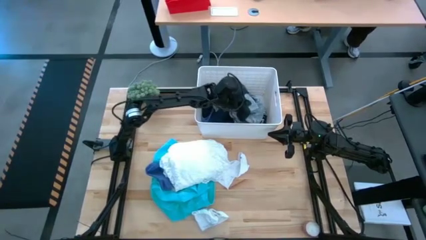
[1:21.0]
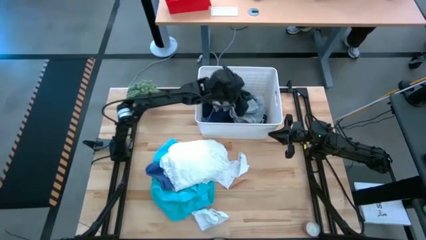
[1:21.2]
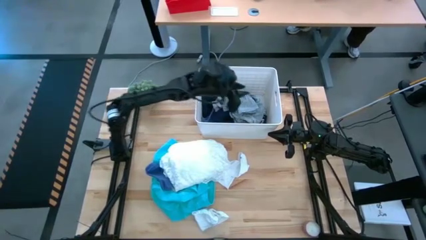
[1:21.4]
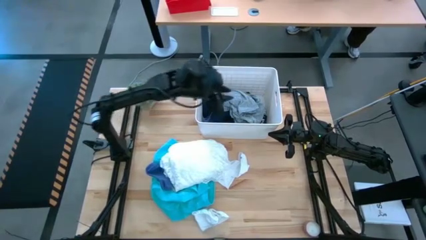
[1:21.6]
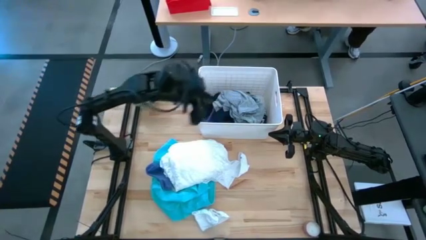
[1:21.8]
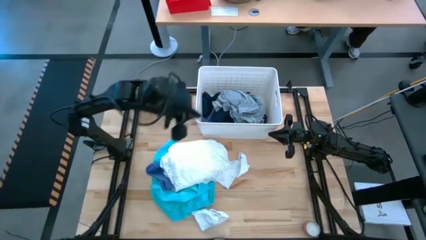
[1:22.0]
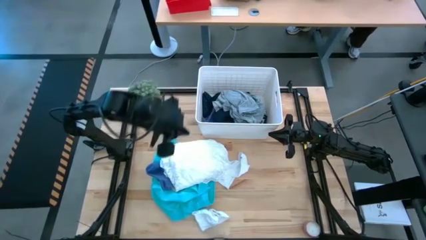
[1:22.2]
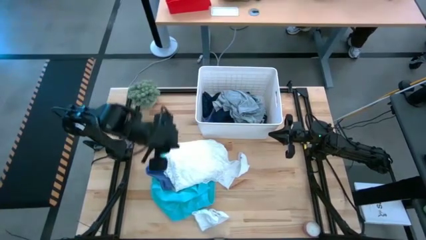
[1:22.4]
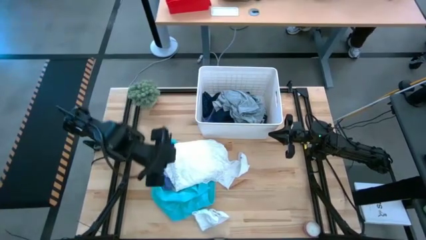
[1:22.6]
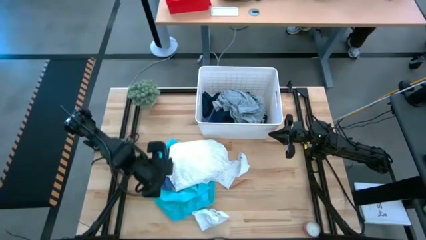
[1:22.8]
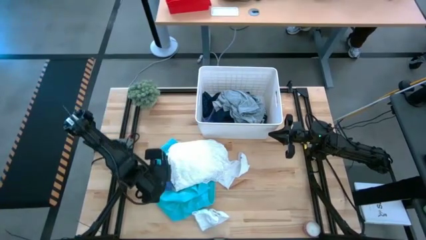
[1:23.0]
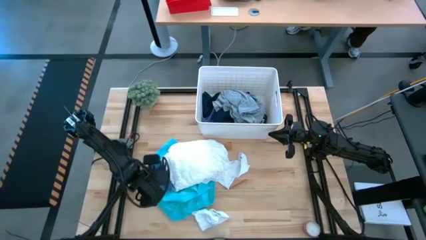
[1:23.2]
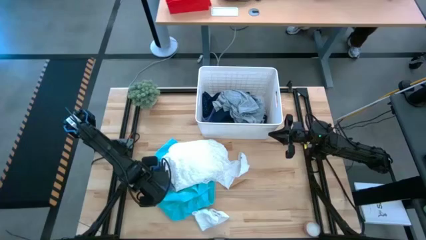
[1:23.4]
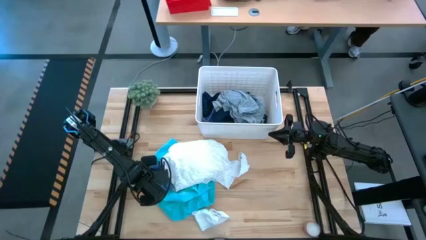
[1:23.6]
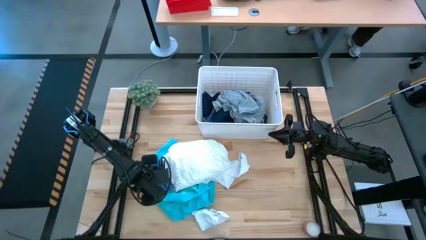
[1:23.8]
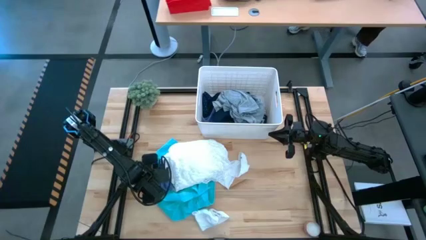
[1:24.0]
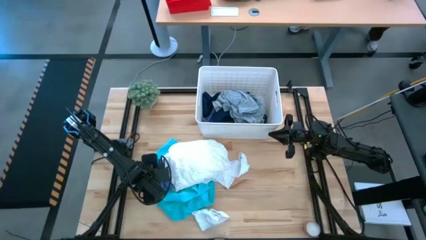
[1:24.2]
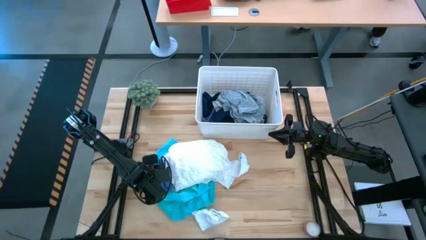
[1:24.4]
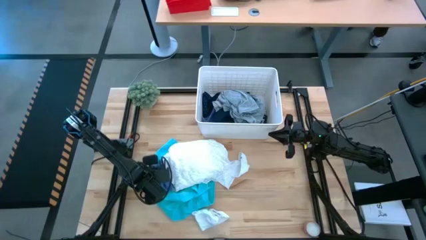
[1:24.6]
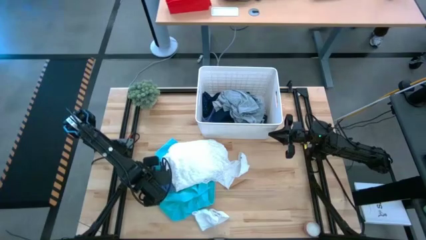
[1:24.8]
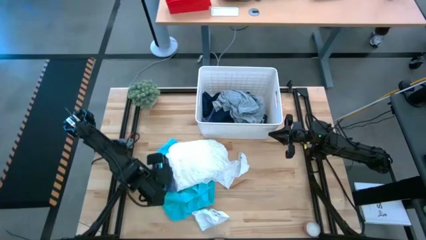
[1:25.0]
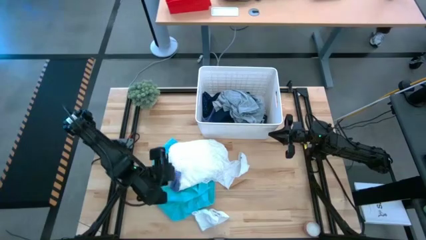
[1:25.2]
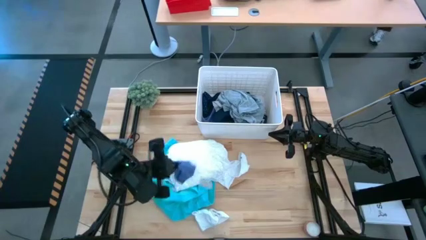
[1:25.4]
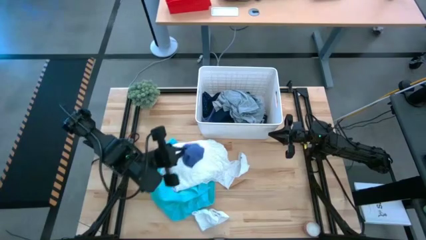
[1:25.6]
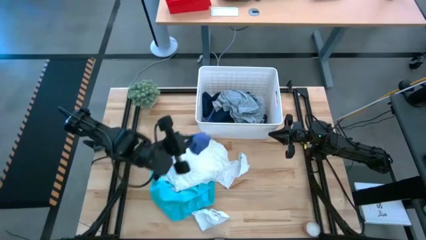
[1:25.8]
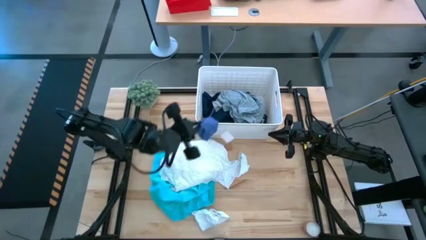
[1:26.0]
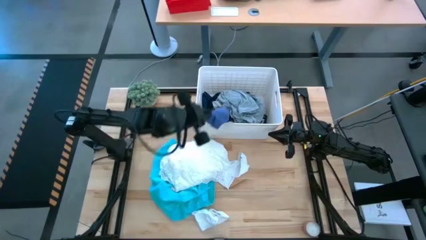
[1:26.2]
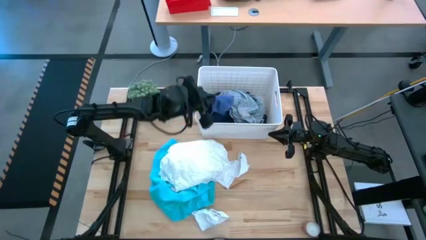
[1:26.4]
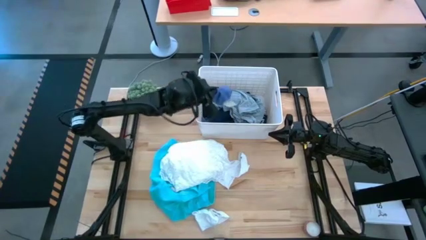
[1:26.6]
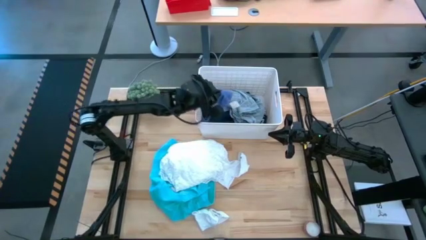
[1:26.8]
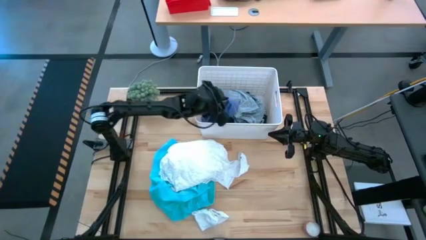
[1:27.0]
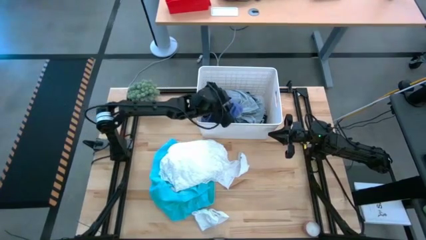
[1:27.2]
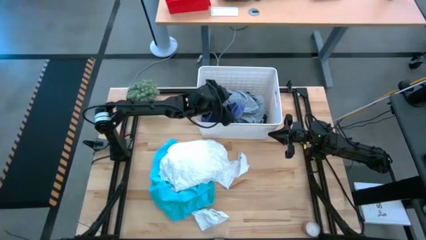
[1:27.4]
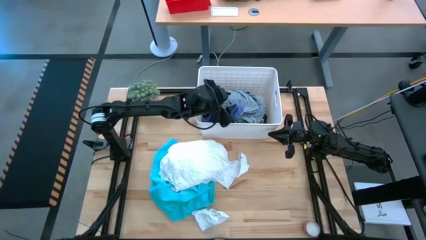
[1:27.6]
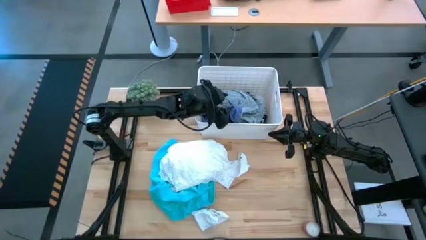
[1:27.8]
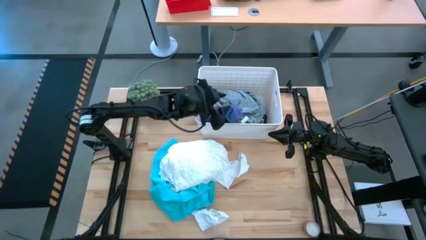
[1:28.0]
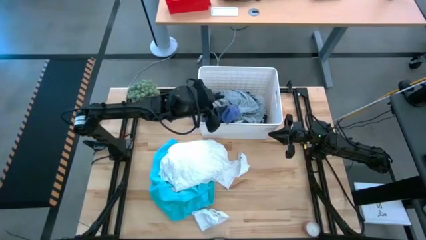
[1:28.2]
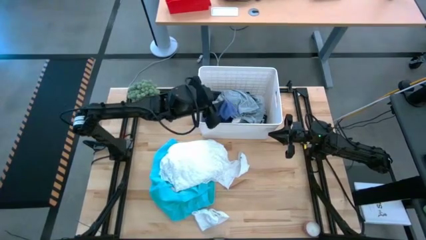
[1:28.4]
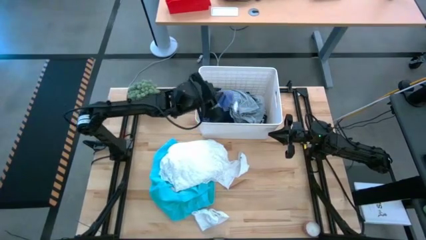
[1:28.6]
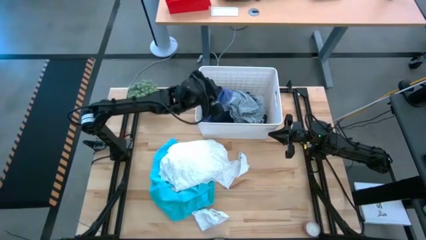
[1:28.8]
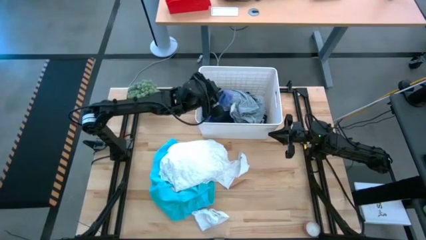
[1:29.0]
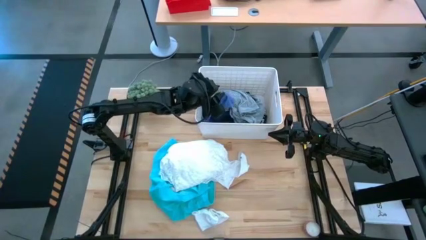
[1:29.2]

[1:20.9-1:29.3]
Task: Sort clothes
Put the blue socks into the white bin

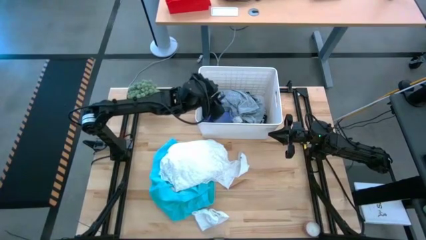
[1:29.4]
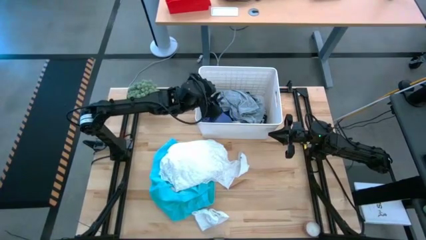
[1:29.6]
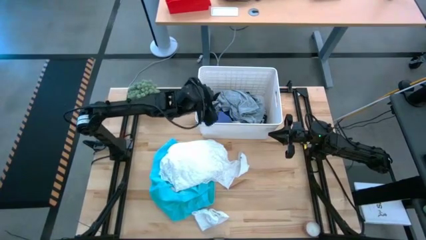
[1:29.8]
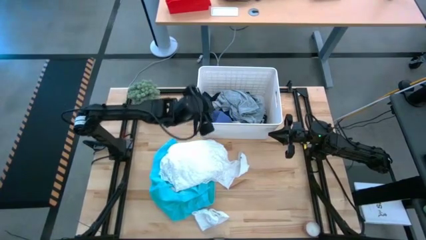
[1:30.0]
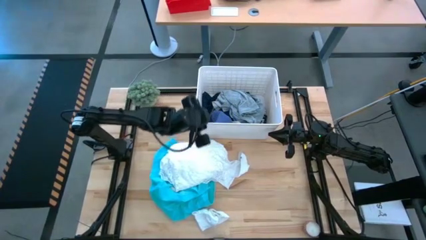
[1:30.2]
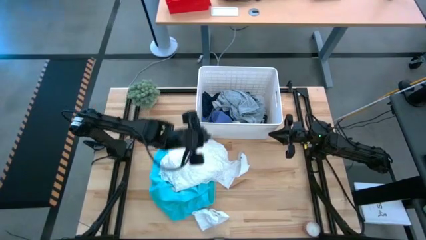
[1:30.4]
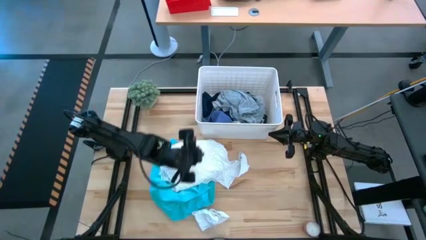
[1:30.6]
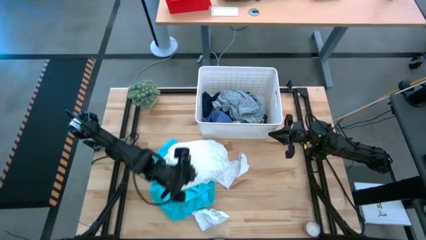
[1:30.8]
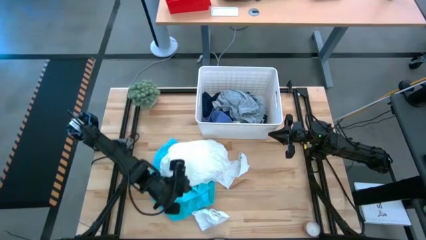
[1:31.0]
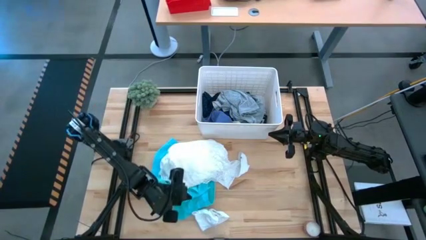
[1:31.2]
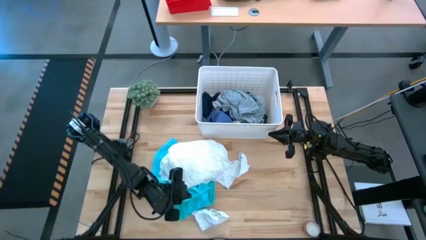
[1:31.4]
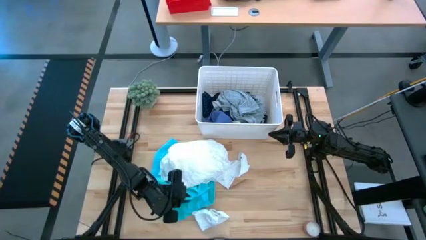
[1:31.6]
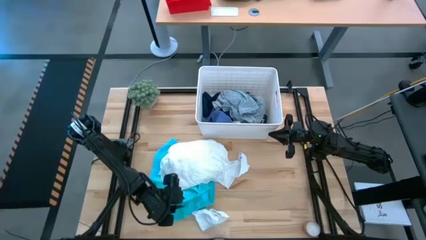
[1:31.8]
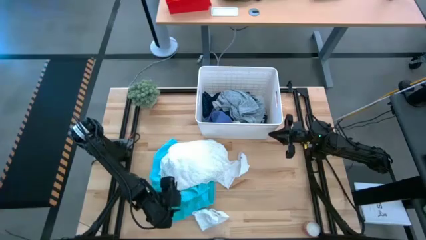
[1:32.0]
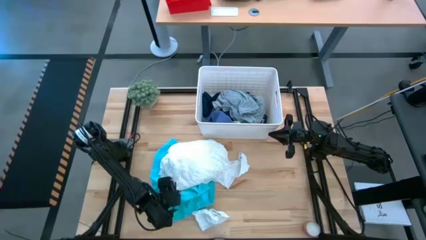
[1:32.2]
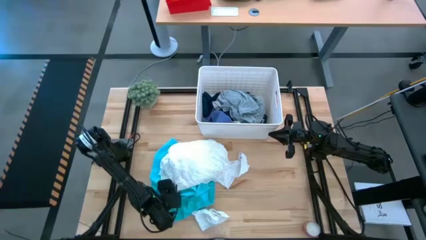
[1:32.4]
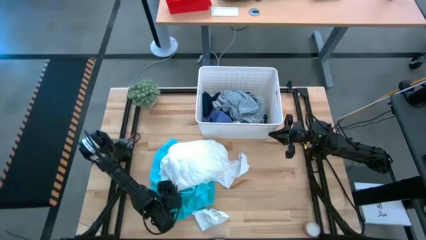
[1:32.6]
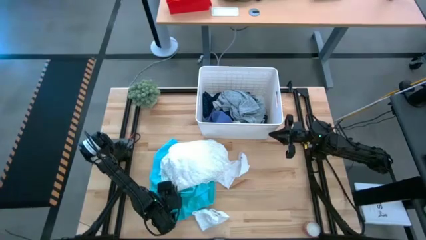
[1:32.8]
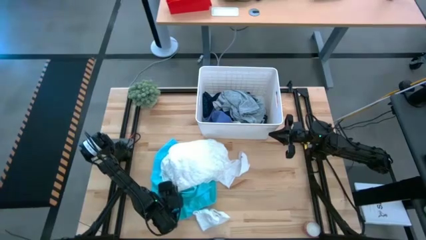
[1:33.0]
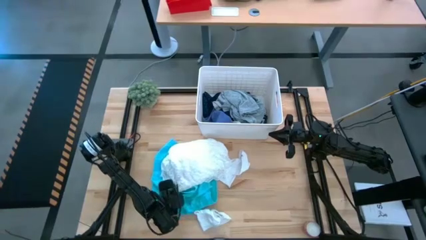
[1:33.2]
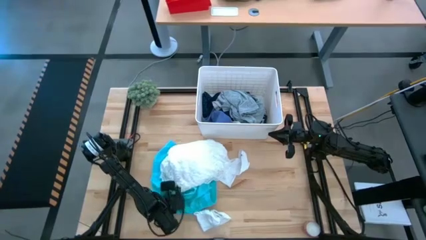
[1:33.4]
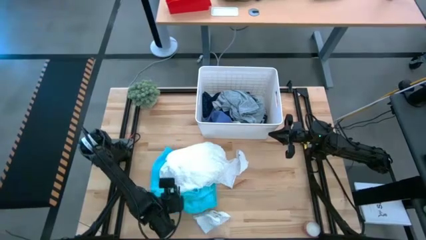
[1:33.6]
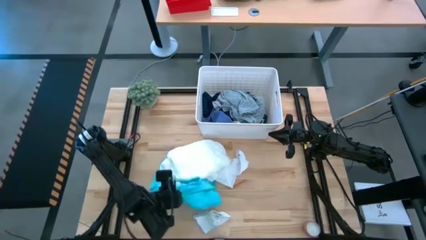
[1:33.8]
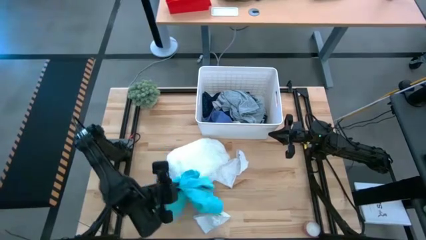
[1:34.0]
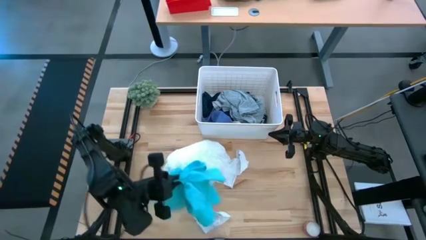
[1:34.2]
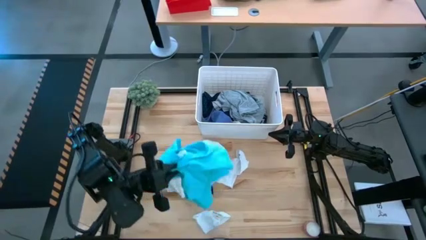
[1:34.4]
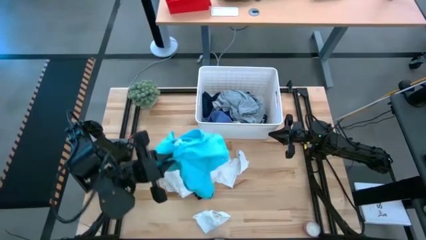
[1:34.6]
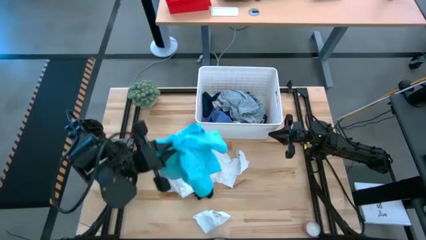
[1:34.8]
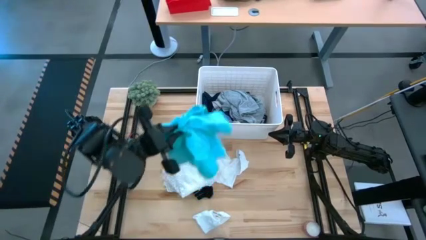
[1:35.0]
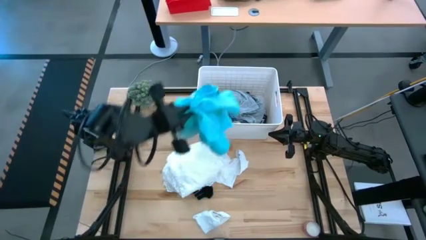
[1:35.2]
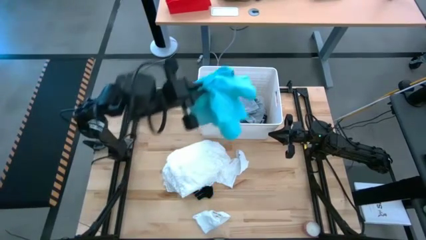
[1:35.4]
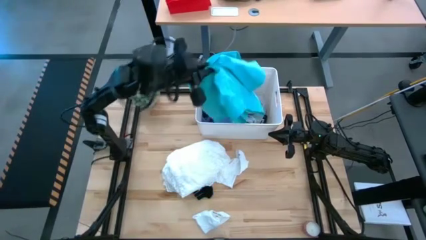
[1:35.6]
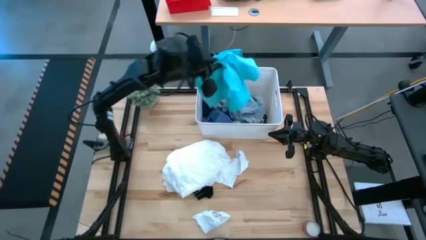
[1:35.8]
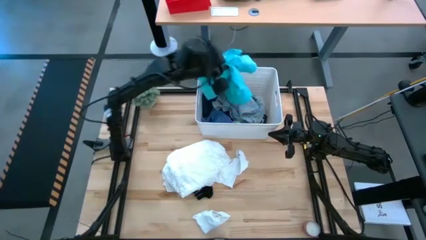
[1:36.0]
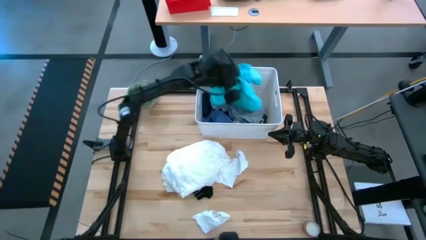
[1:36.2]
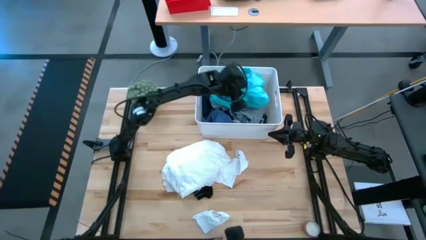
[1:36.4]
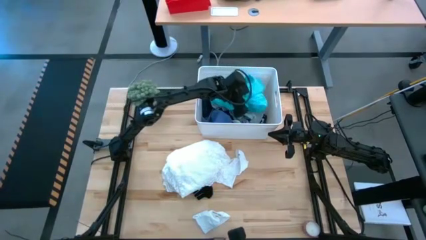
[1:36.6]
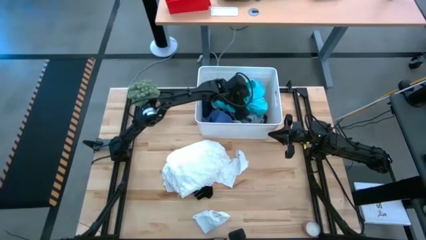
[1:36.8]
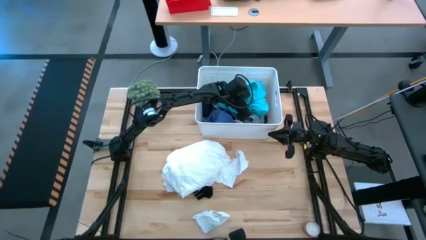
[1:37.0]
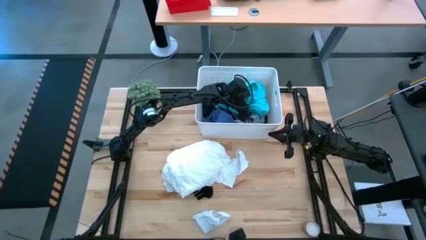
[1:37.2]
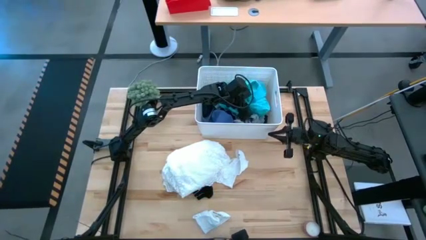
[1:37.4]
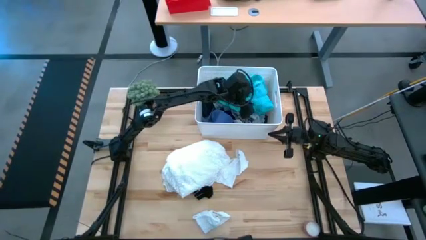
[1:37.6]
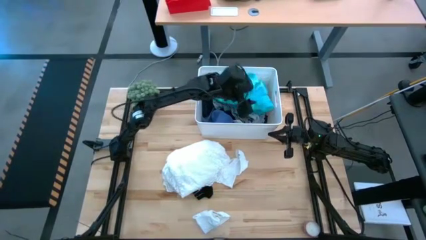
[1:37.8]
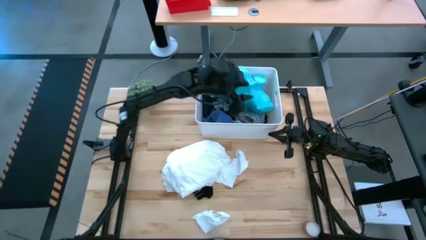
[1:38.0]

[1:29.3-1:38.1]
Put the blue shorts into the white bin
